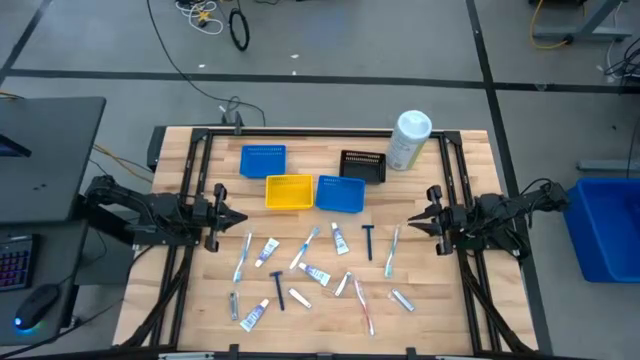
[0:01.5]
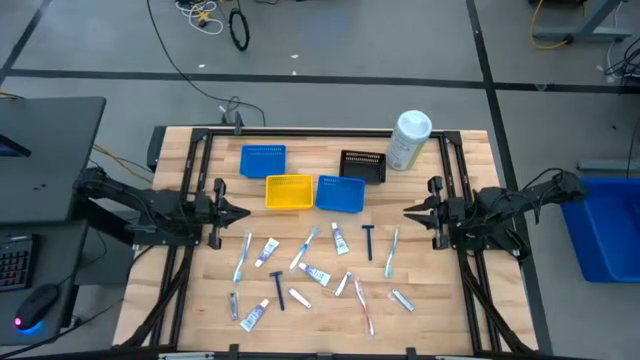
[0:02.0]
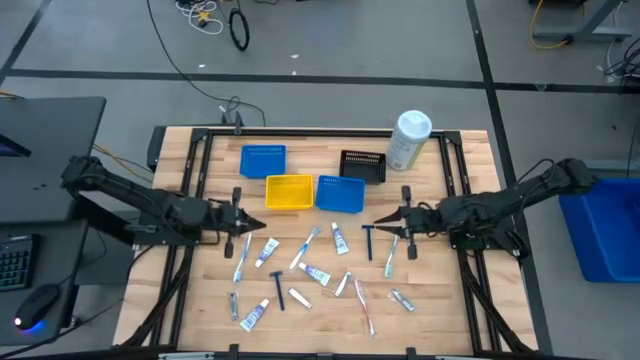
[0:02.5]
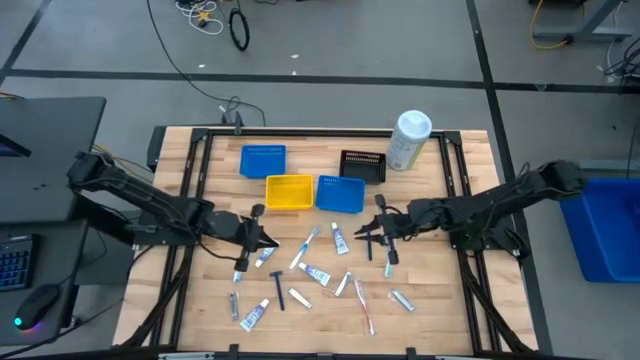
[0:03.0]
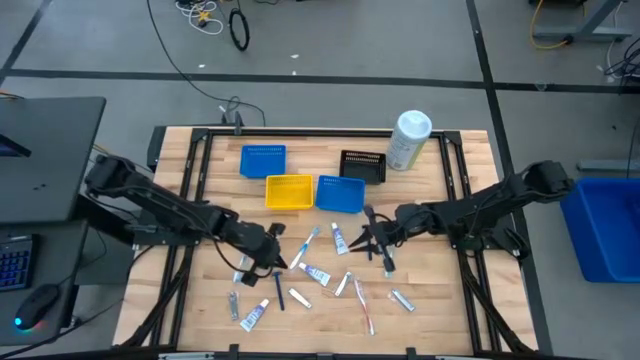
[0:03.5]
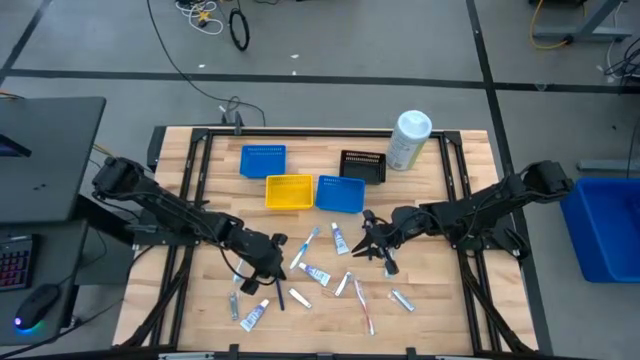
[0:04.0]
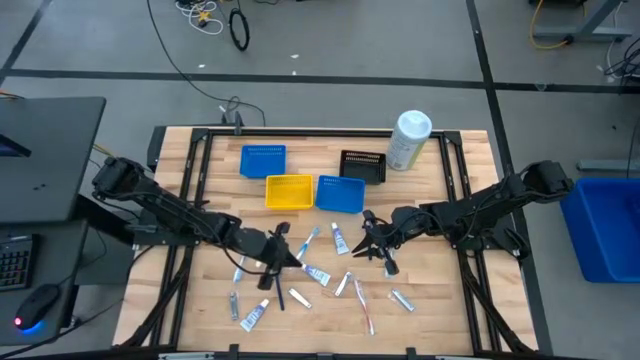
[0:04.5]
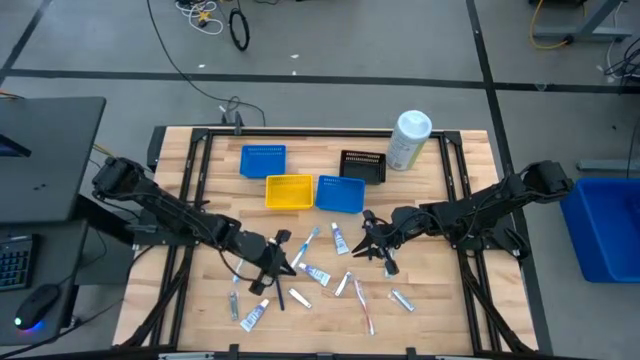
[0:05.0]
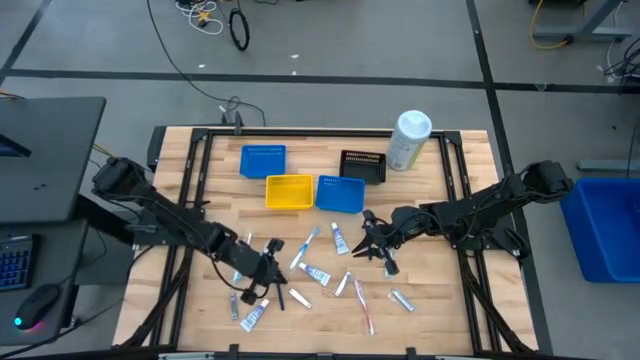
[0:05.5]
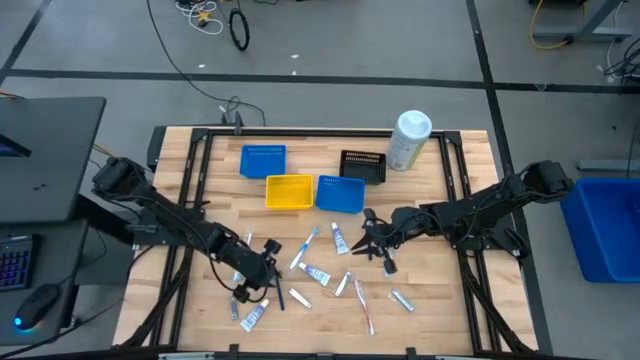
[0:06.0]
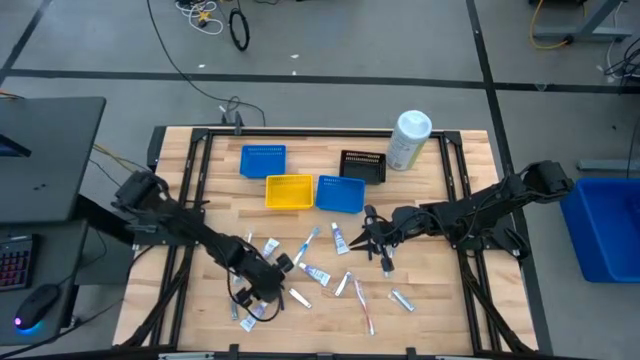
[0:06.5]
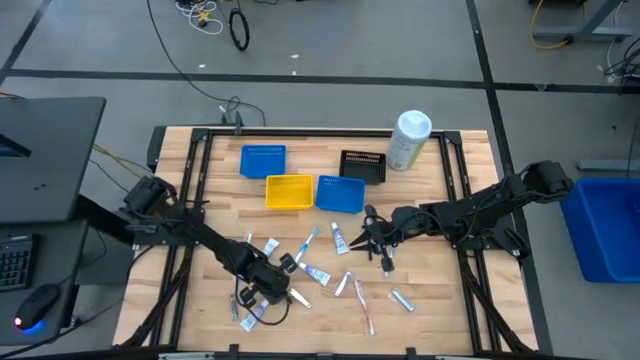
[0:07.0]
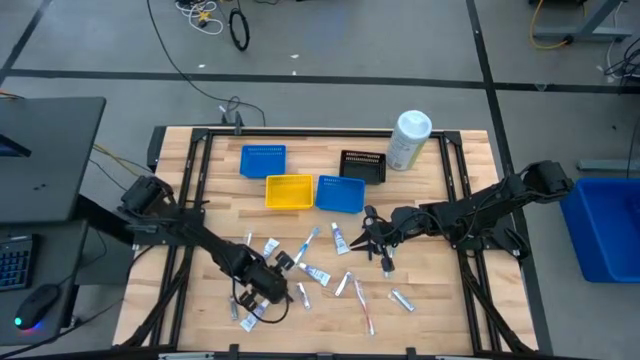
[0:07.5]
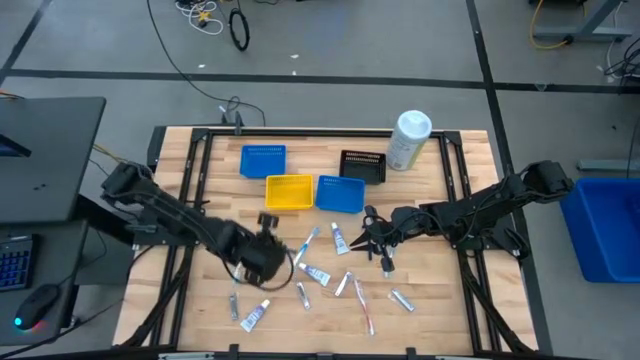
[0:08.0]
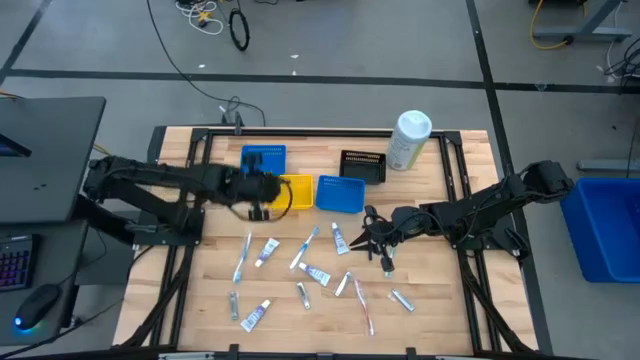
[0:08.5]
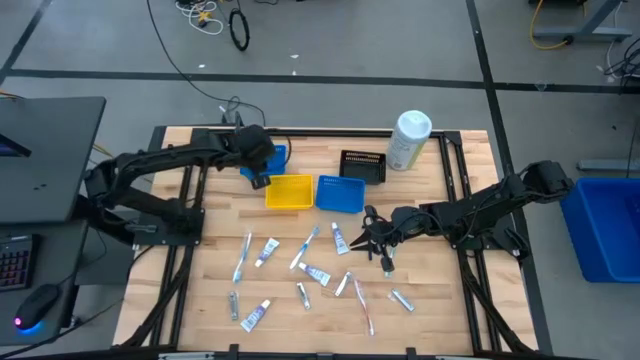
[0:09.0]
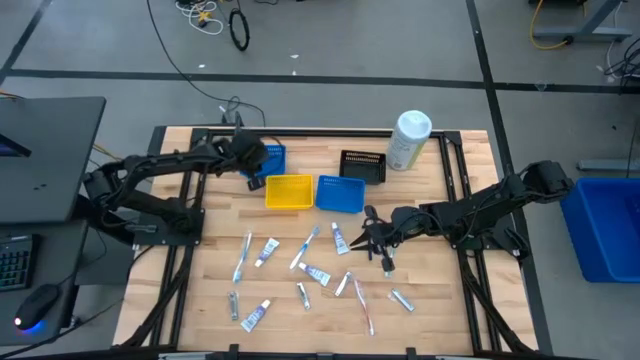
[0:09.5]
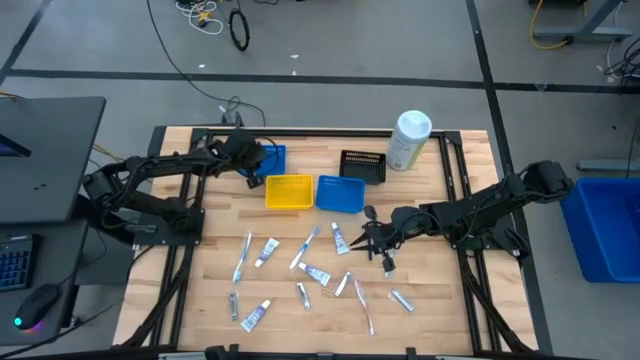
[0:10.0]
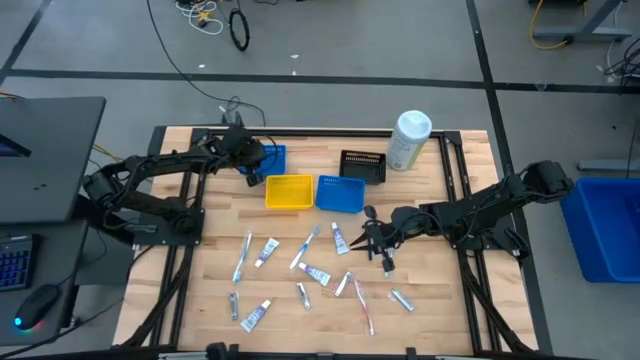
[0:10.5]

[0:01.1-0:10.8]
Task: Pick & Place Travel size toiletries
Put the left razor into the left blue basket

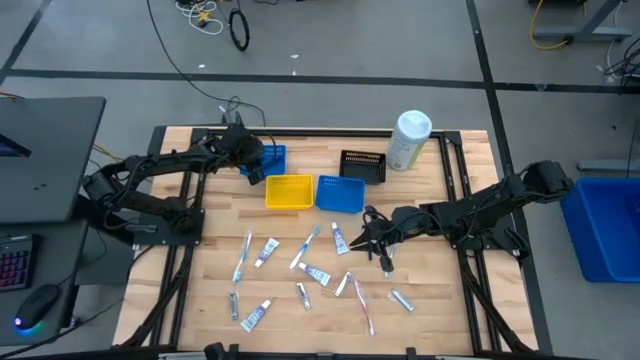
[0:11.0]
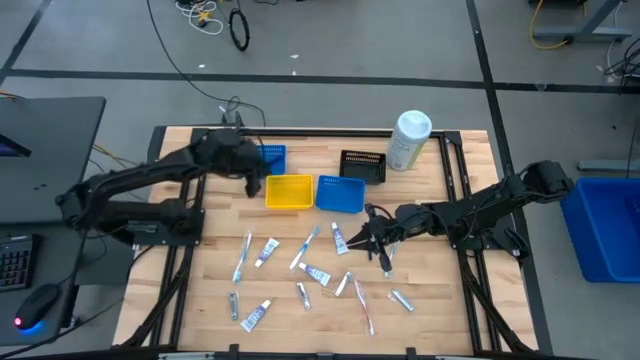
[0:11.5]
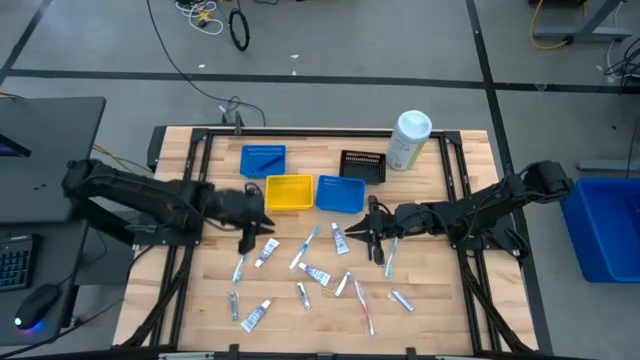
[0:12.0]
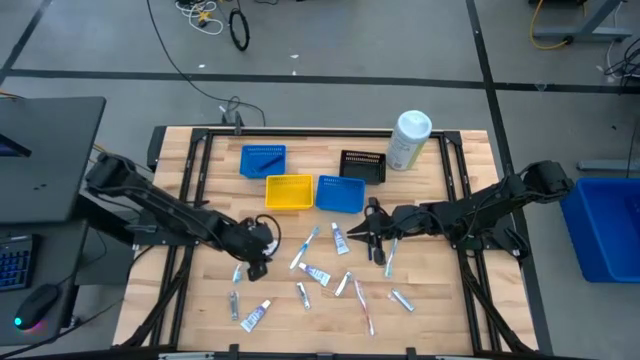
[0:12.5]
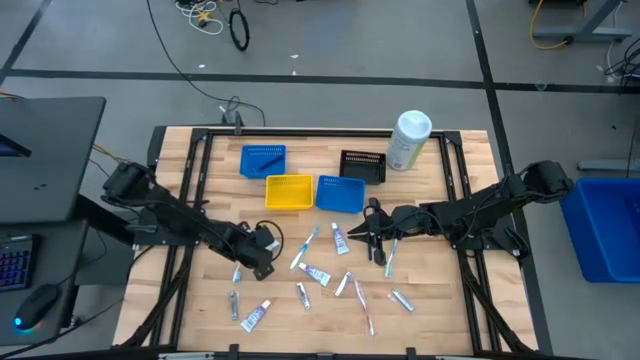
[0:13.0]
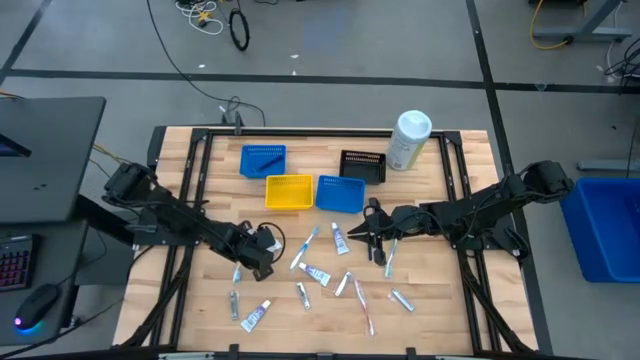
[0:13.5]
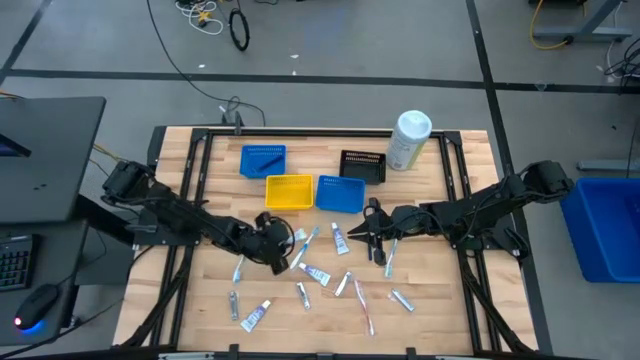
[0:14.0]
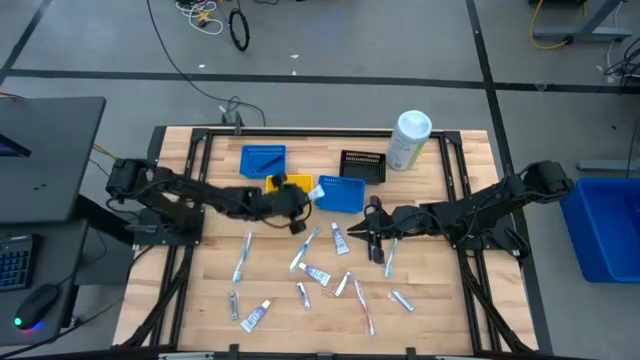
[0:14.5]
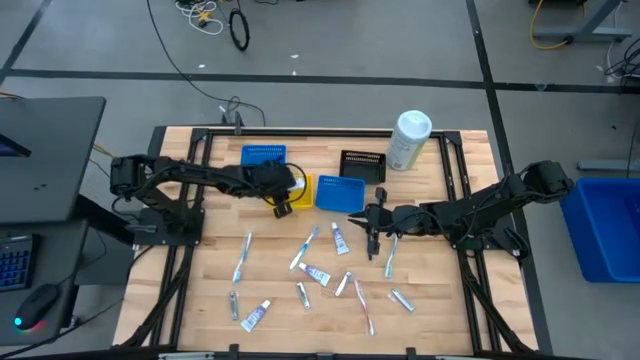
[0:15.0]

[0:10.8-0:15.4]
Put the toothpaste into the yellow basket

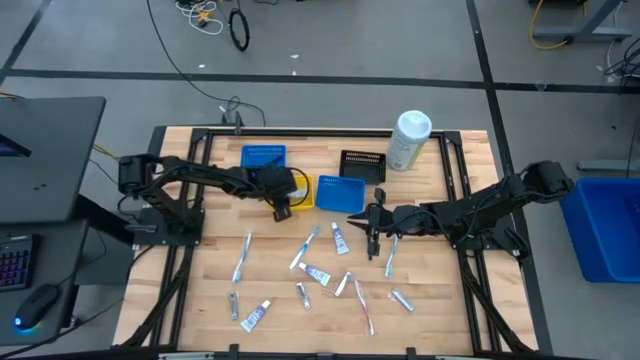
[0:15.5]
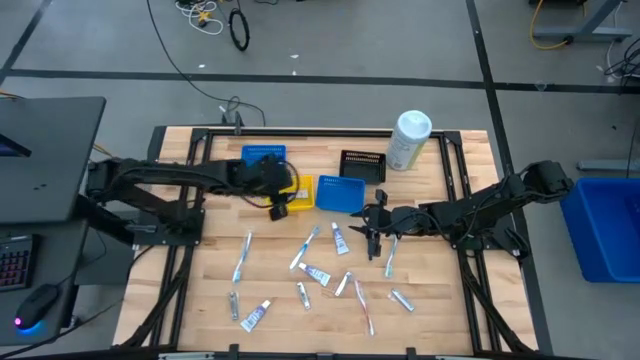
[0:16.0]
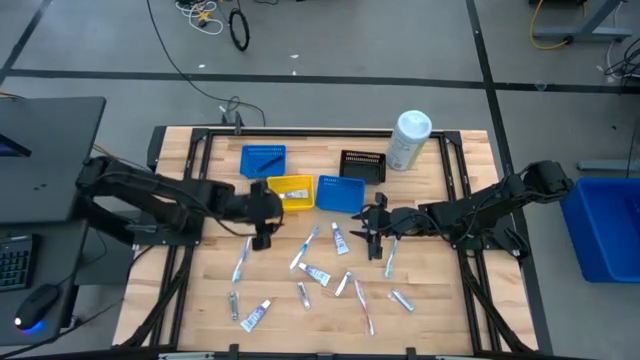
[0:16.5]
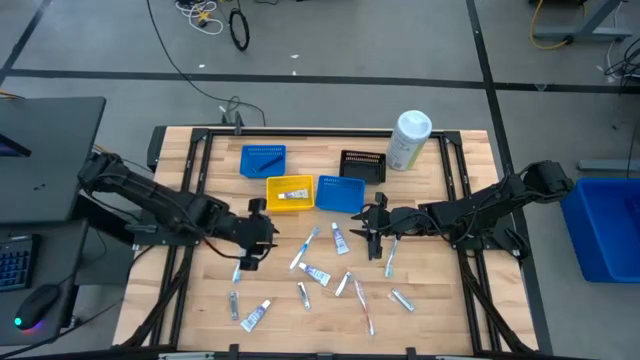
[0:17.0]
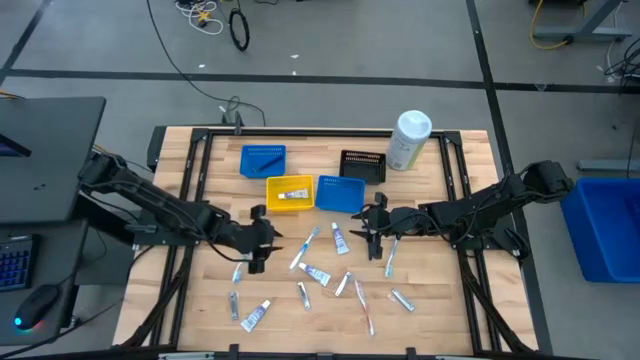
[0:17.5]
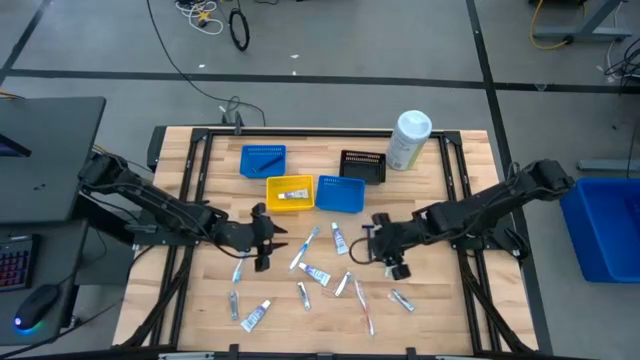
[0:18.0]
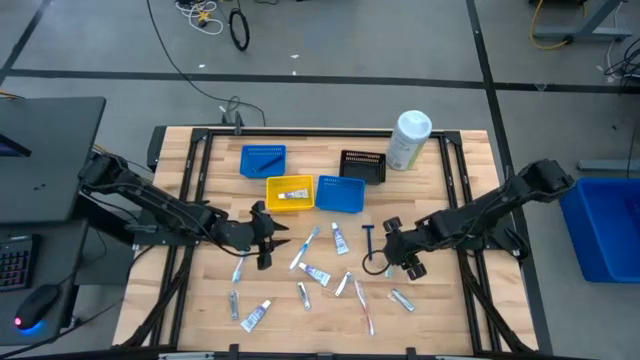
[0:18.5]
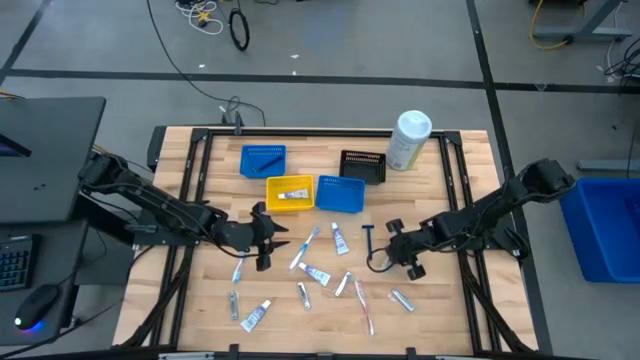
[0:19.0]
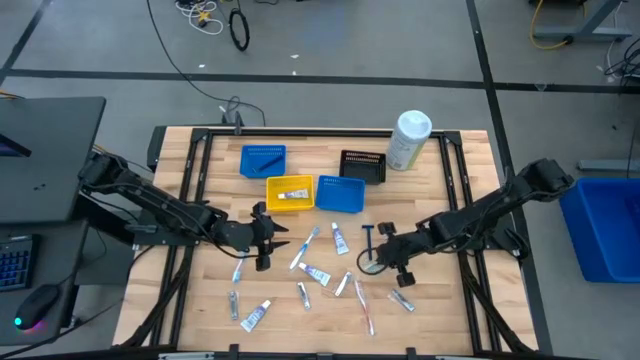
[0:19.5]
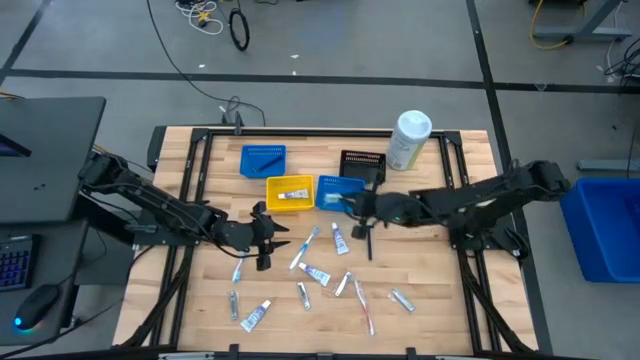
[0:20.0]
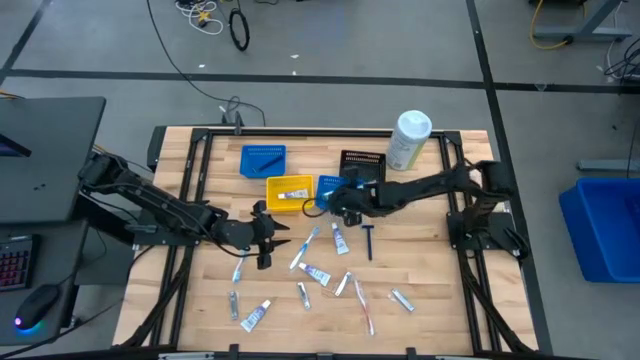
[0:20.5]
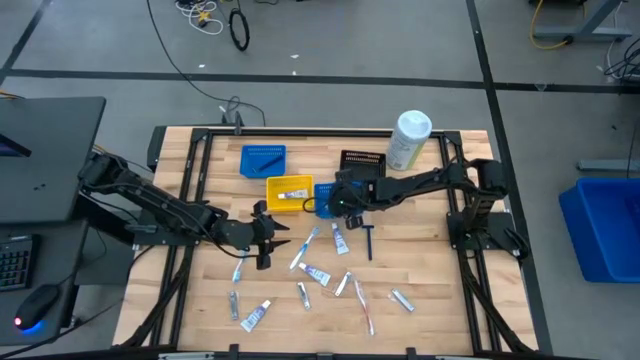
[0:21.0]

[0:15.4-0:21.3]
Put the green toothbrush into the right blue basket

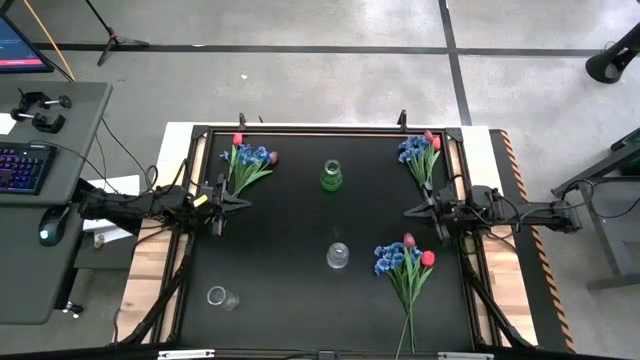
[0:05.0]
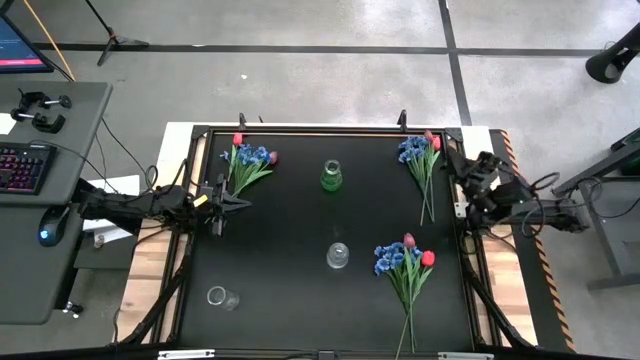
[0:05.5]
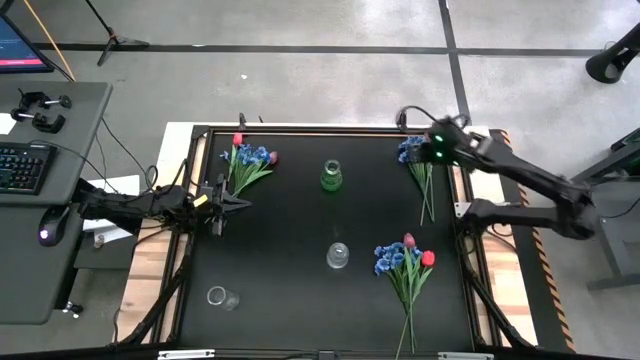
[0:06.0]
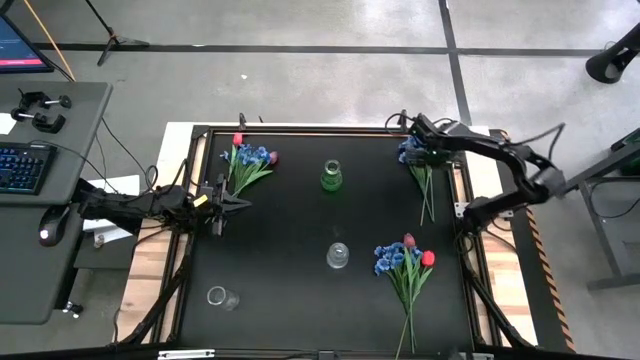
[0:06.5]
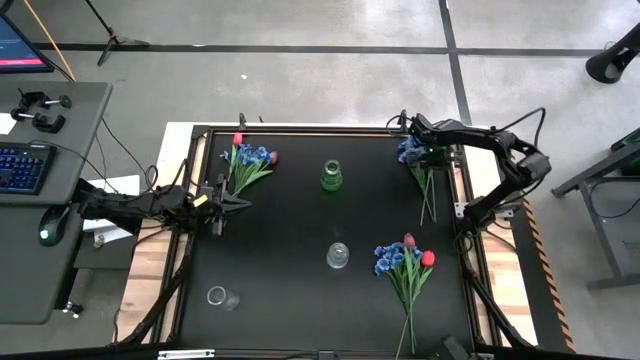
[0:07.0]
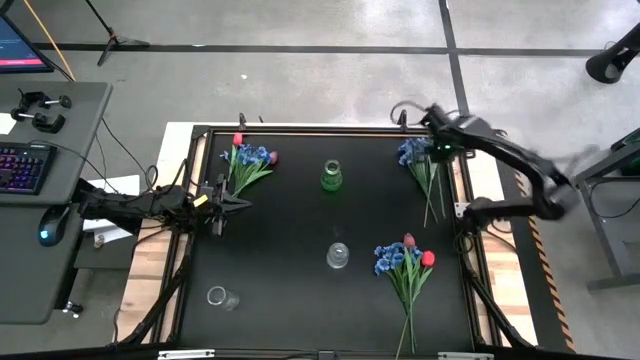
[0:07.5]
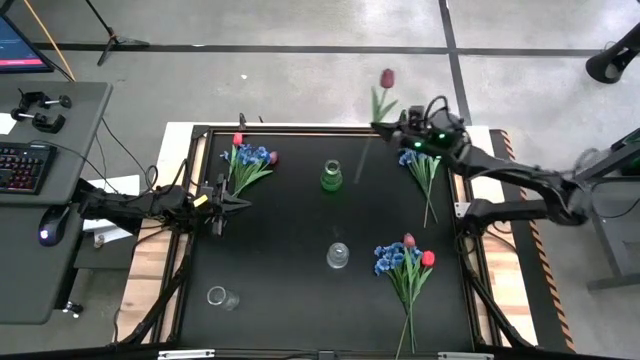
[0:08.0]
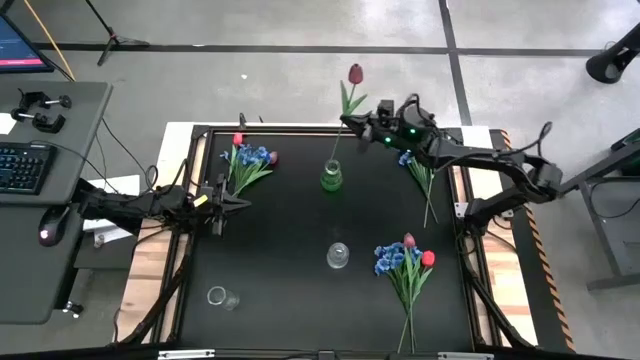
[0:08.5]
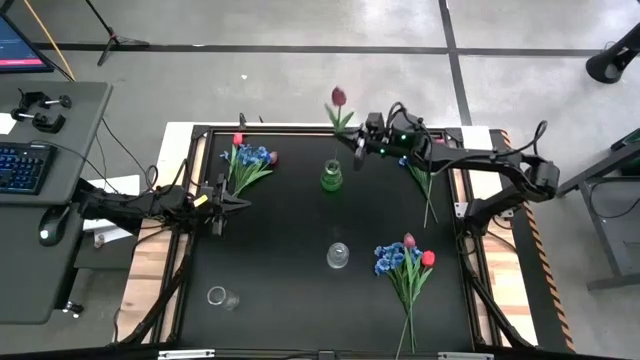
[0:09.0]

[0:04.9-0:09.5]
Task: Sort flowers into vase by color
Put the top right dark red tulip into the green vase
